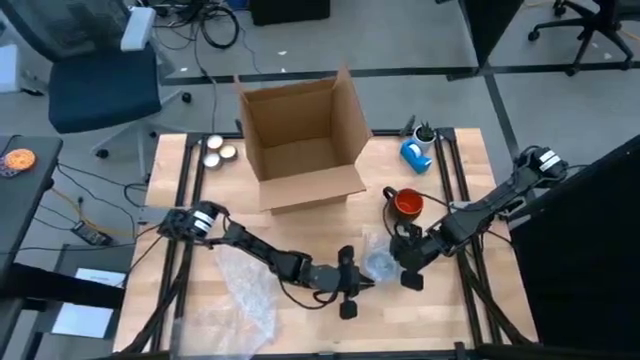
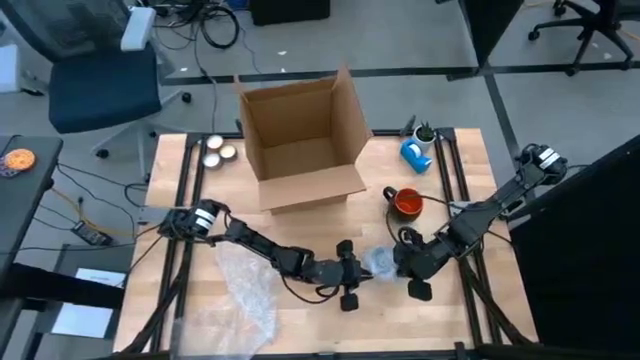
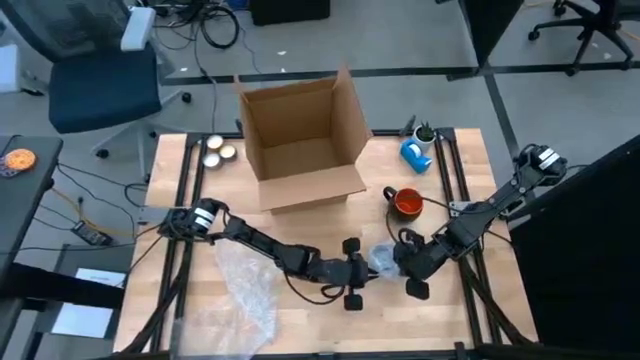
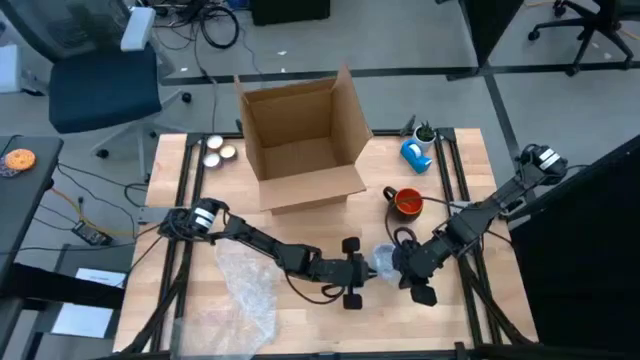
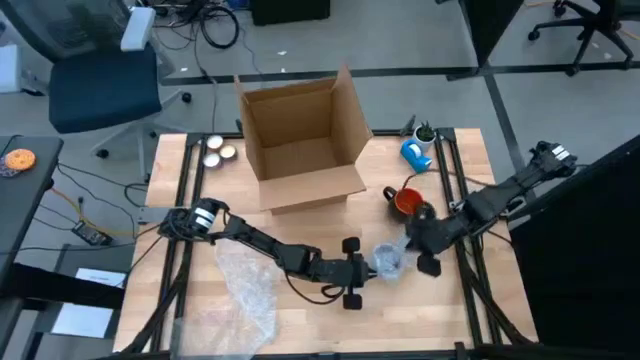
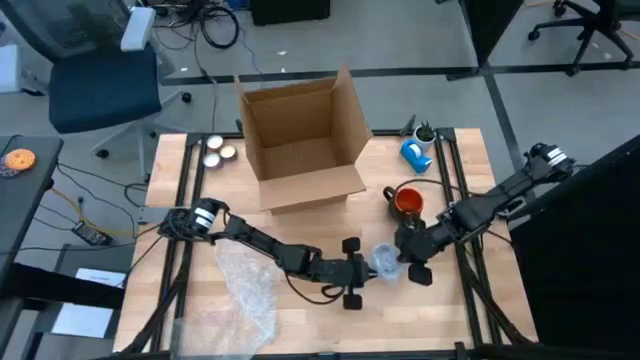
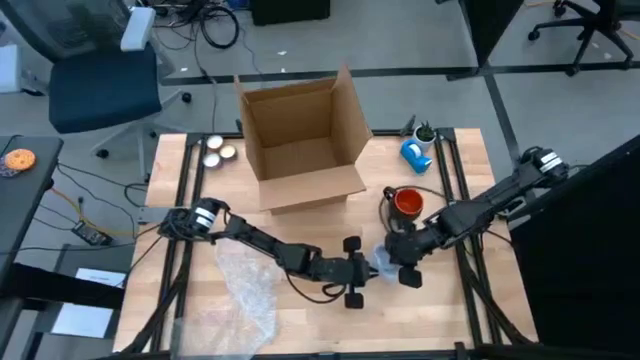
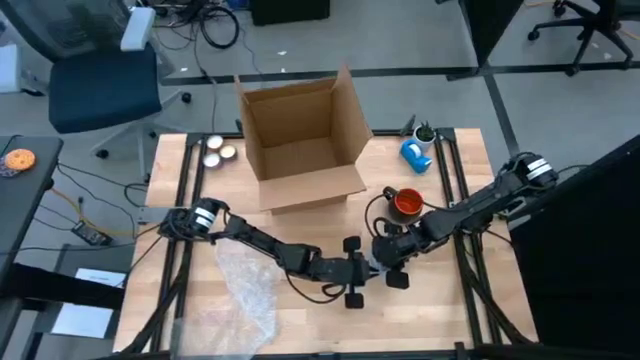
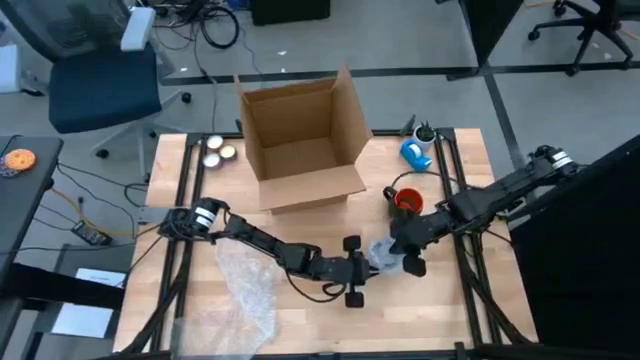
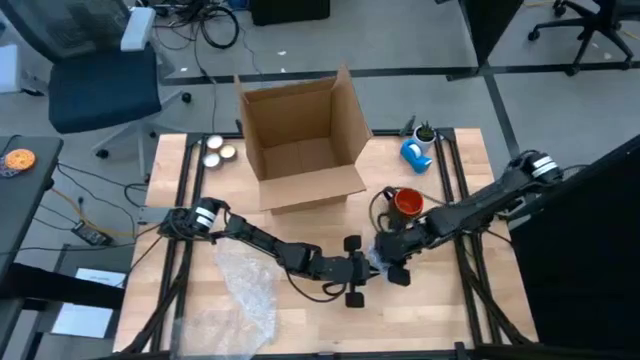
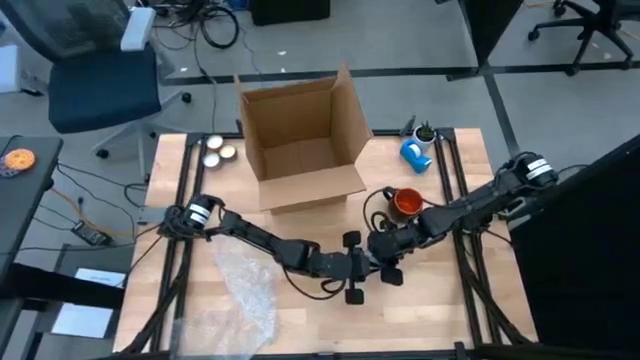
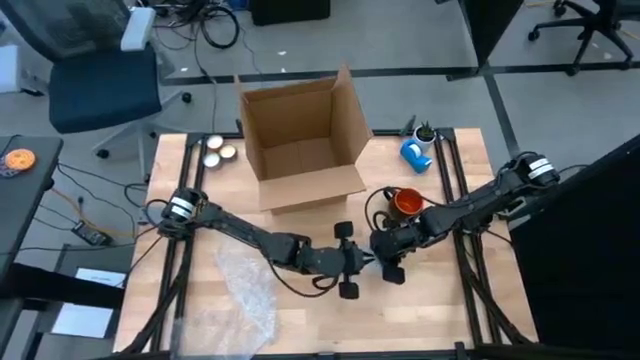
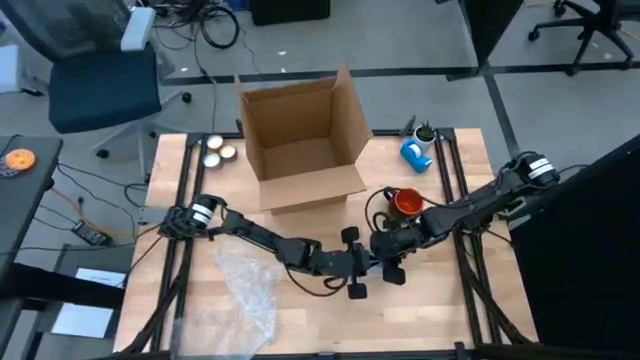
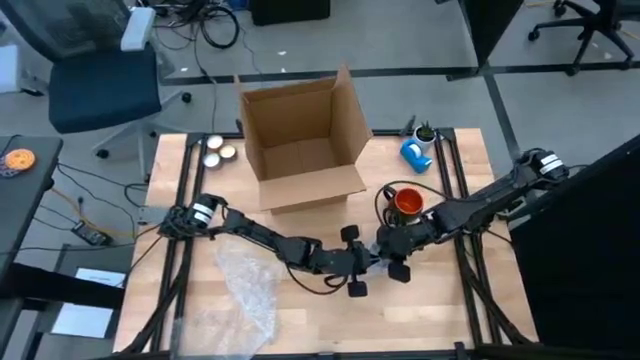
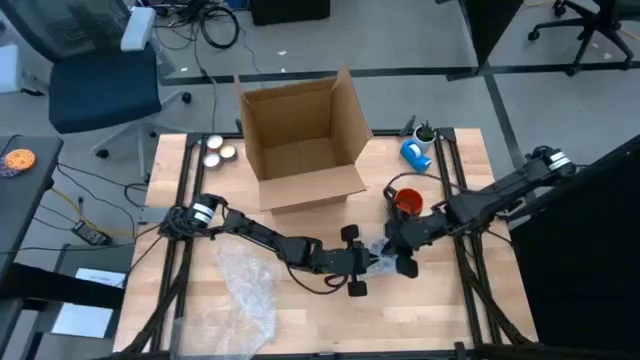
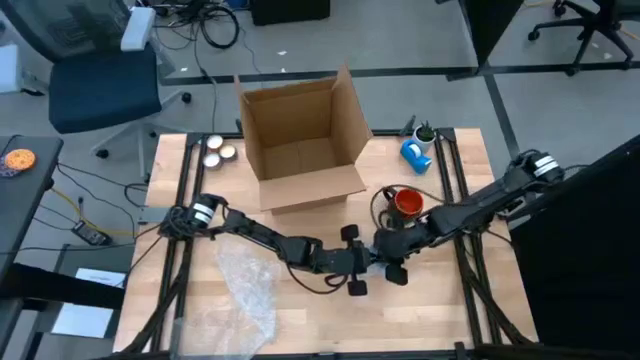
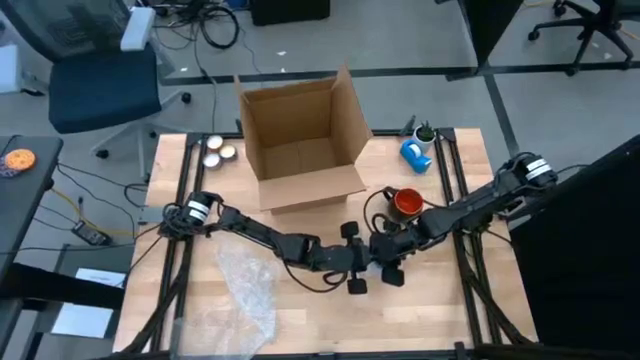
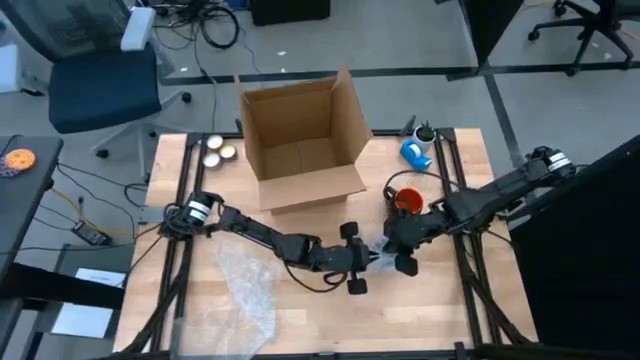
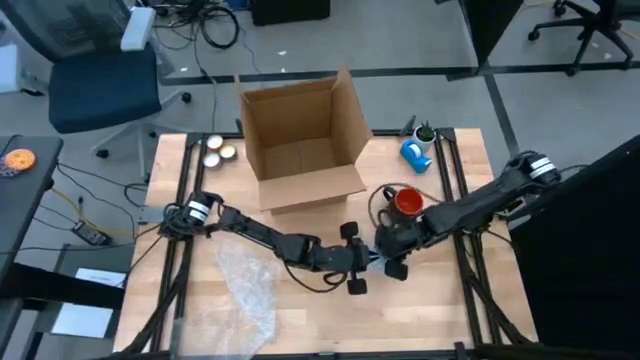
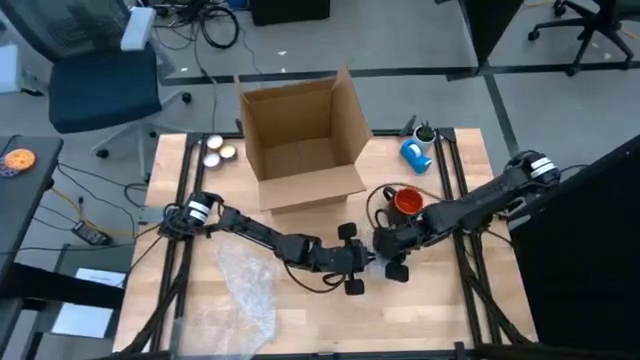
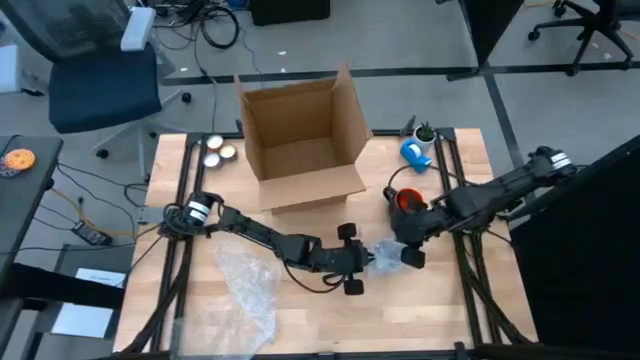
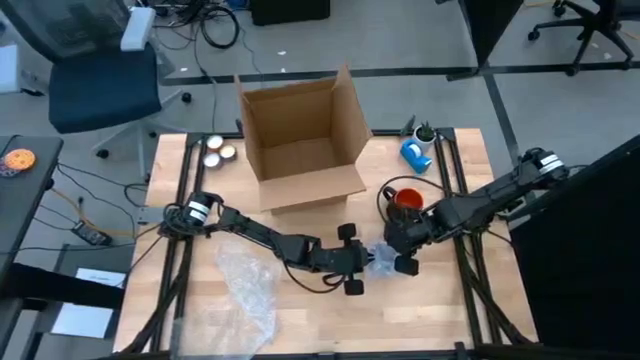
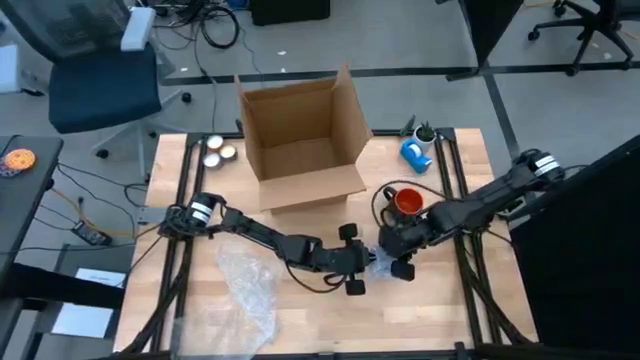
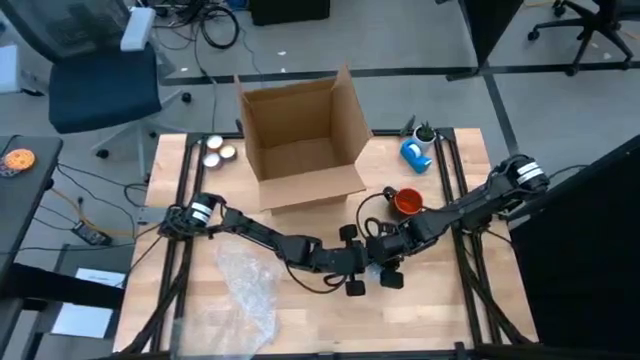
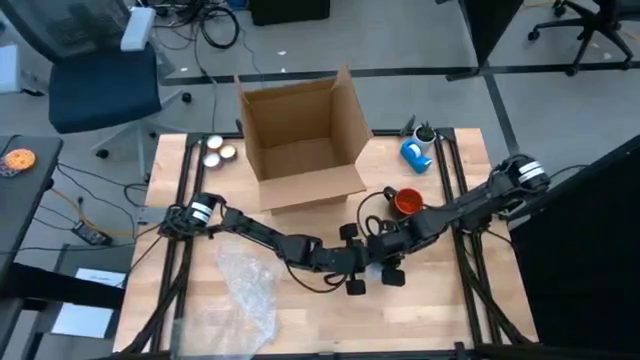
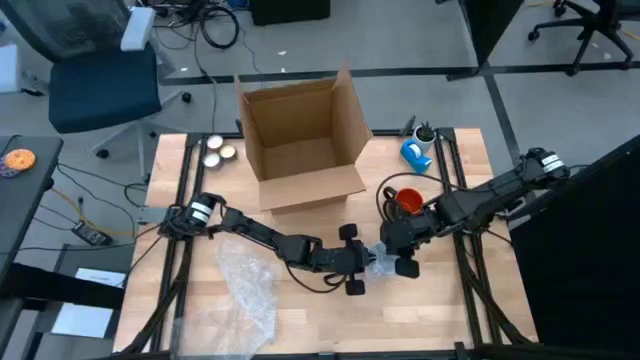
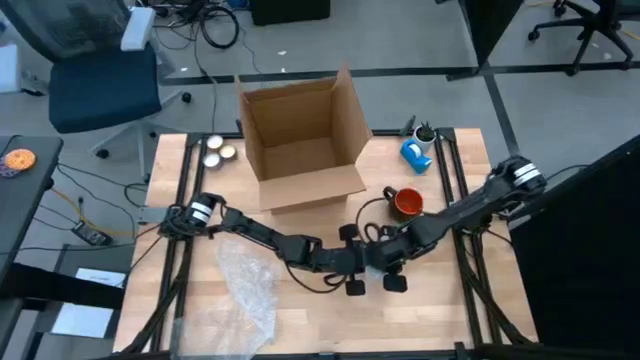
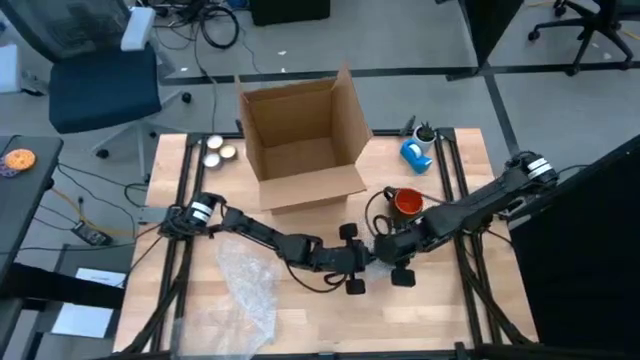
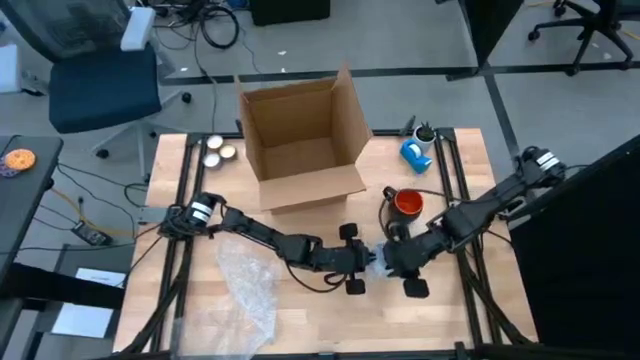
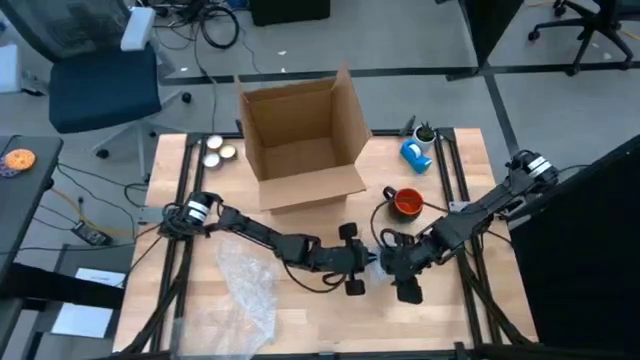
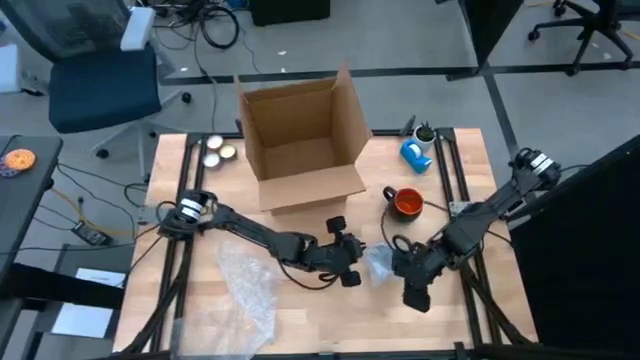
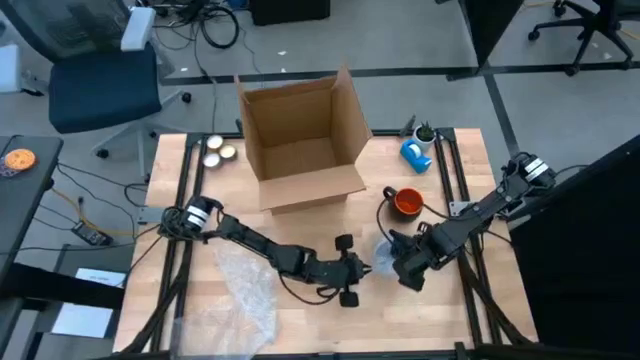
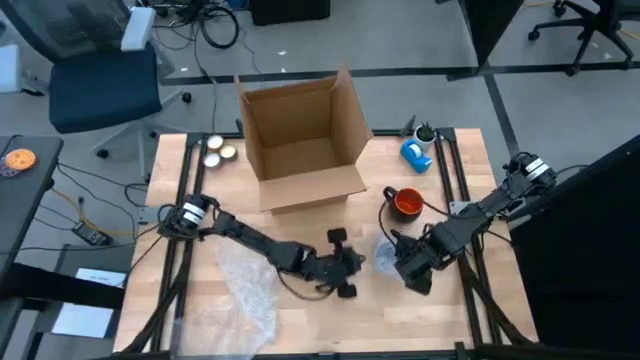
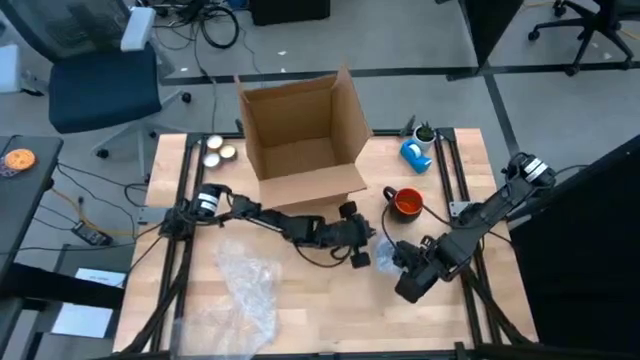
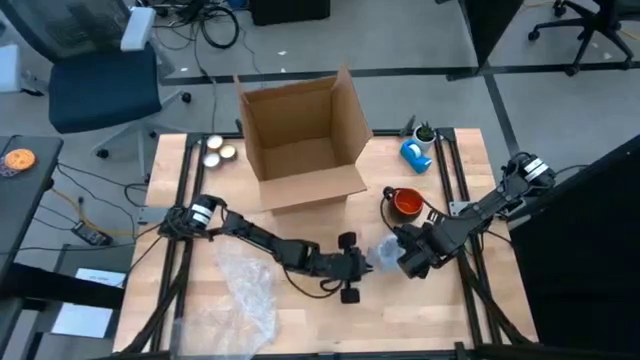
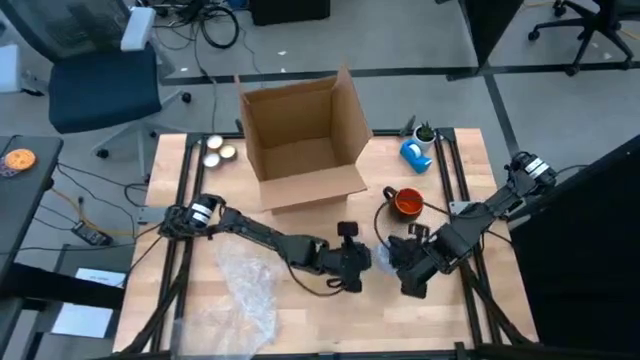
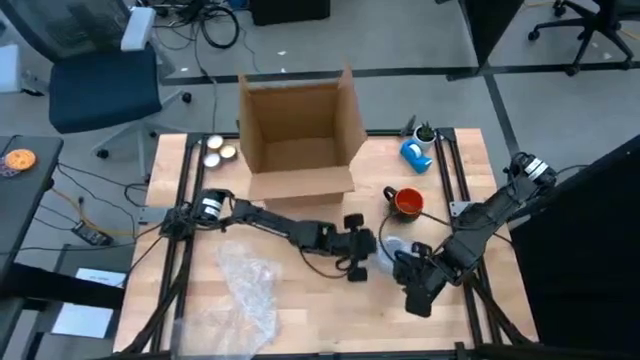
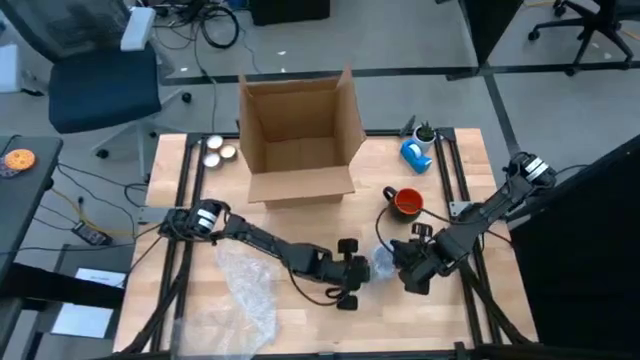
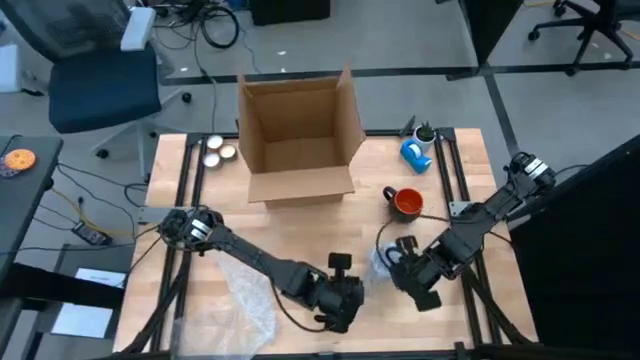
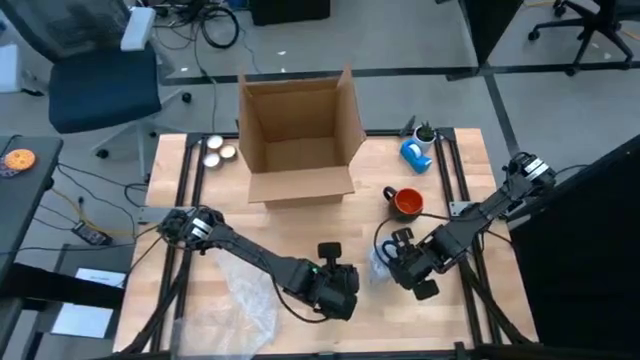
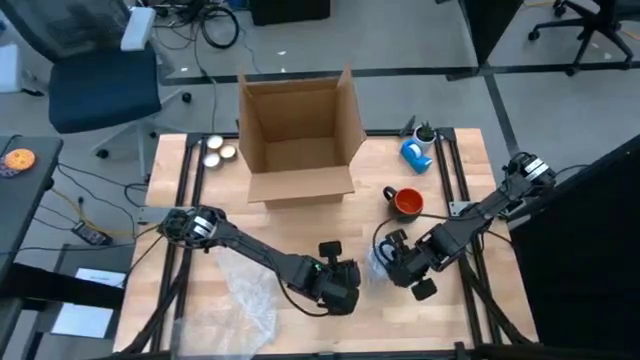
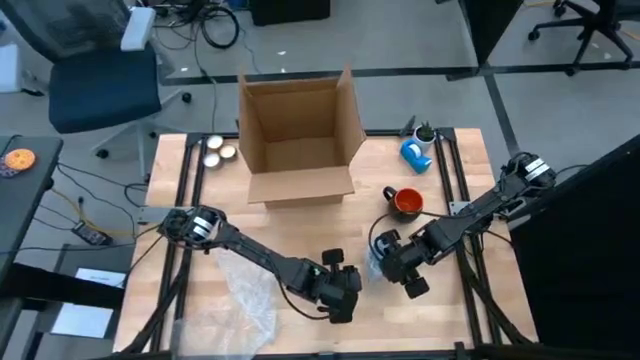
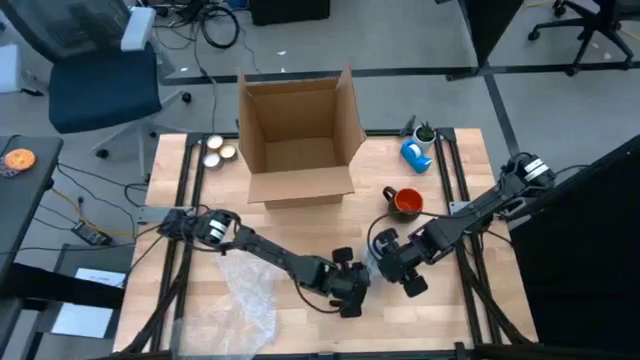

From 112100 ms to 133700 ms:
Task: wrap mug
Wrap the blue mug with the top bubble wrap
